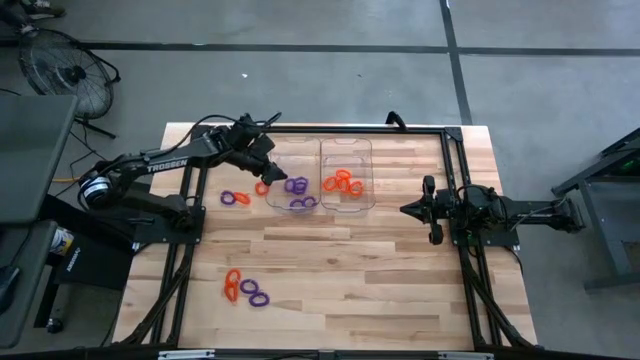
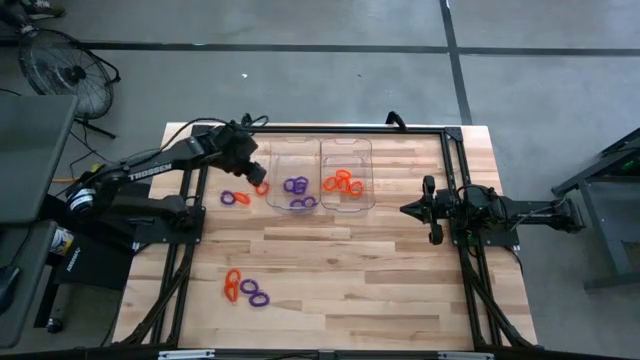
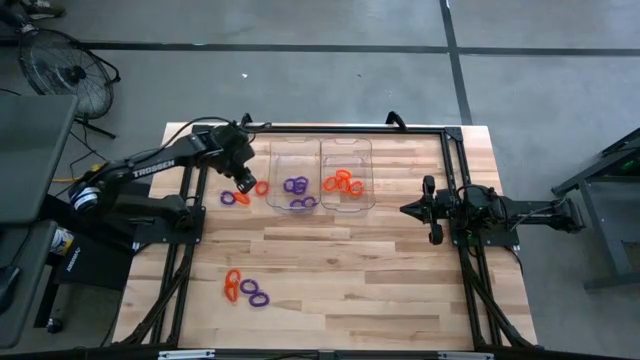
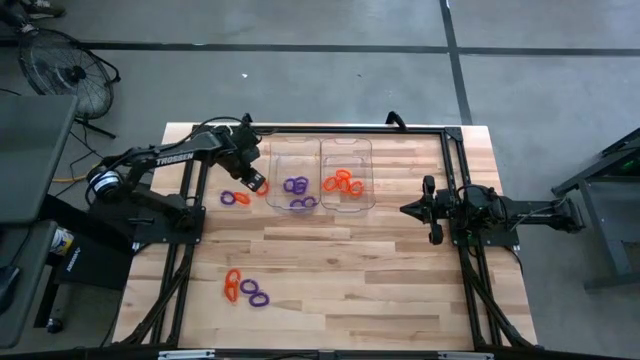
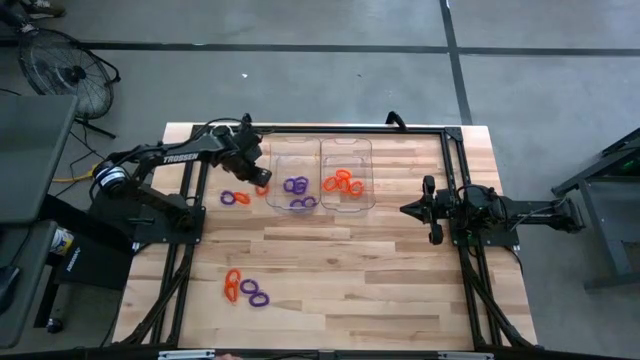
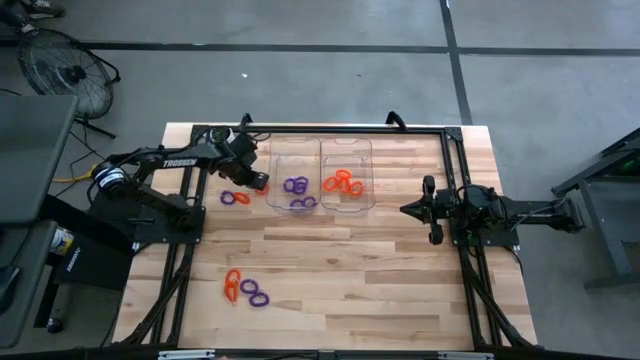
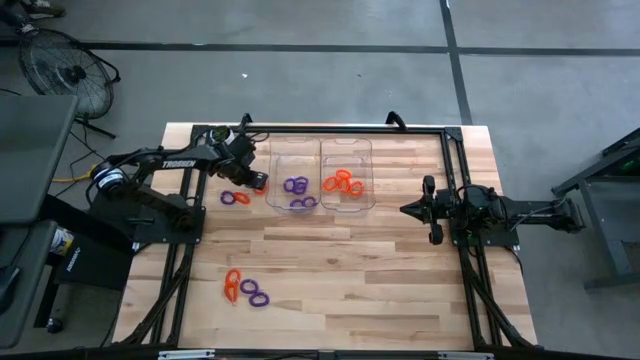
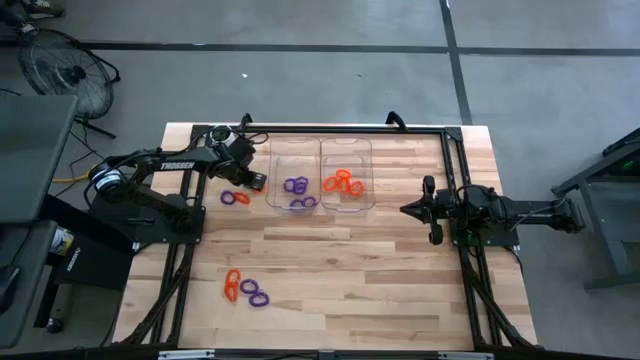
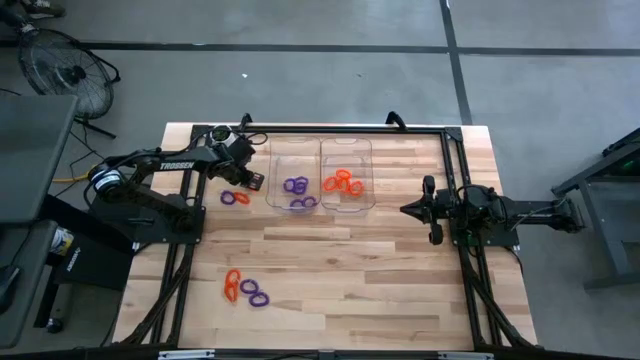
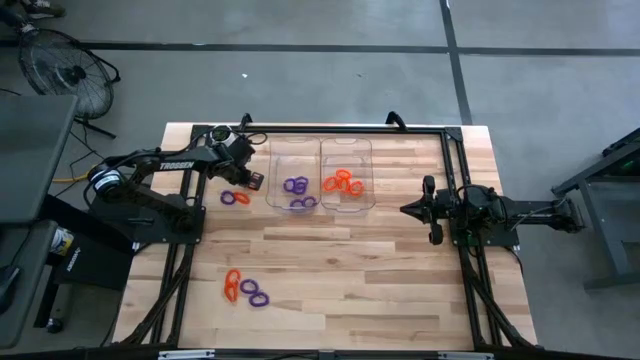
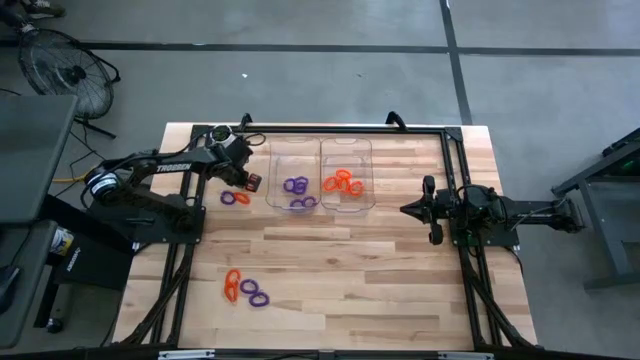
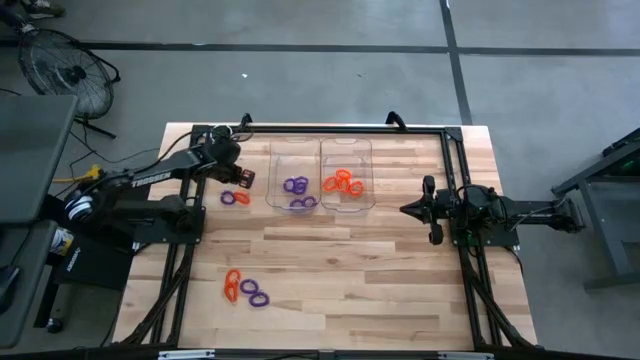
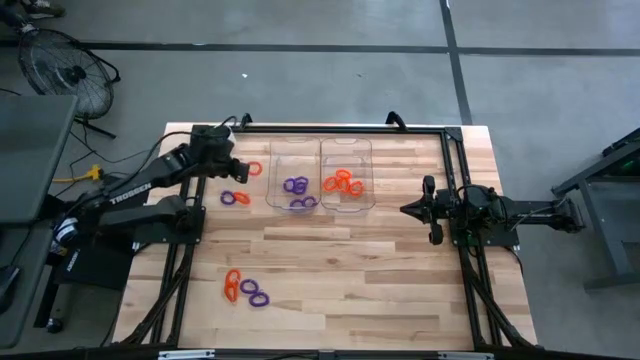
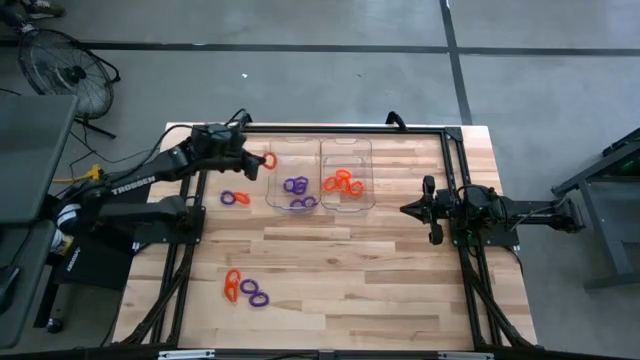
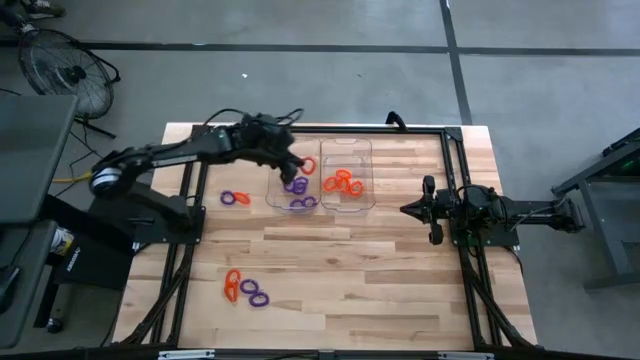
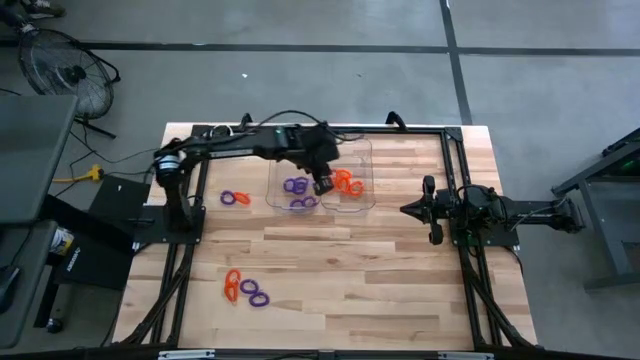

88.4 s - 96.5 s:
Task: Sort spring keychains
Put the orange spring keychain into the right transparent bin

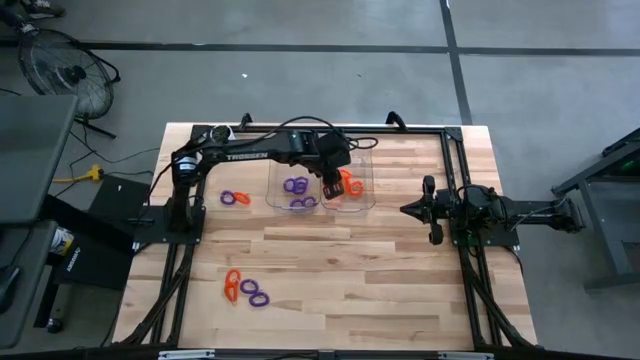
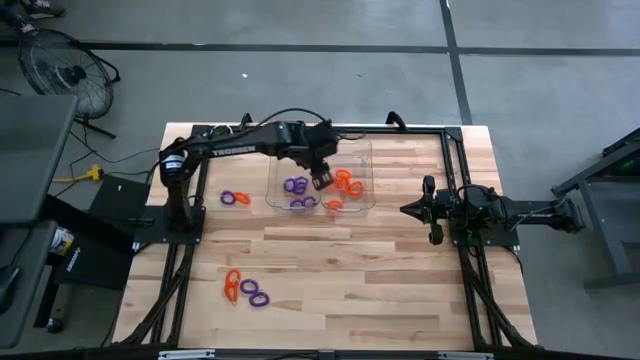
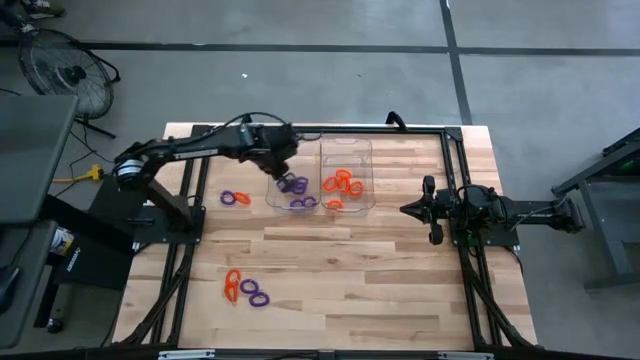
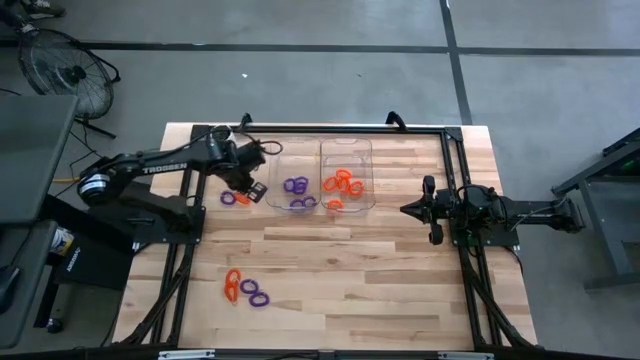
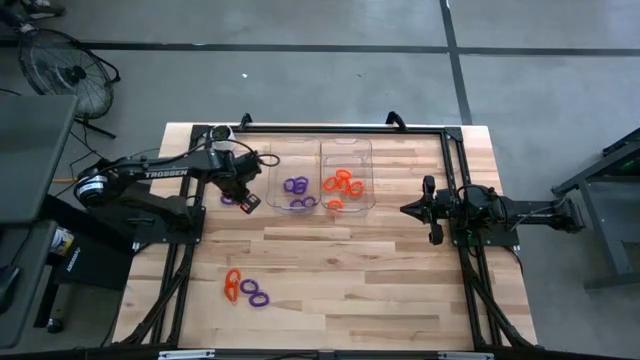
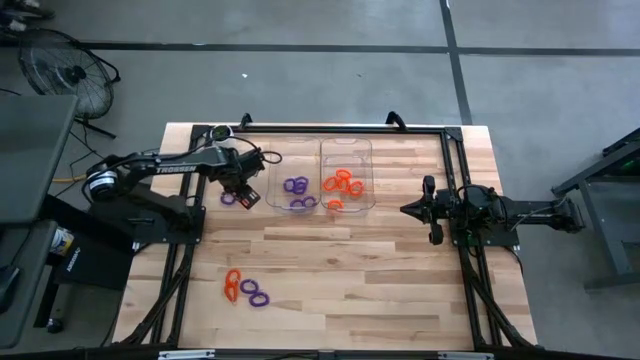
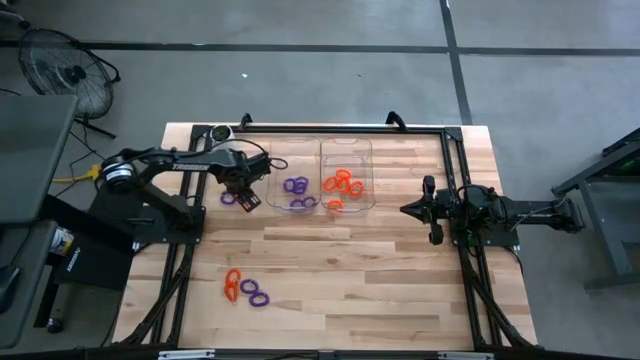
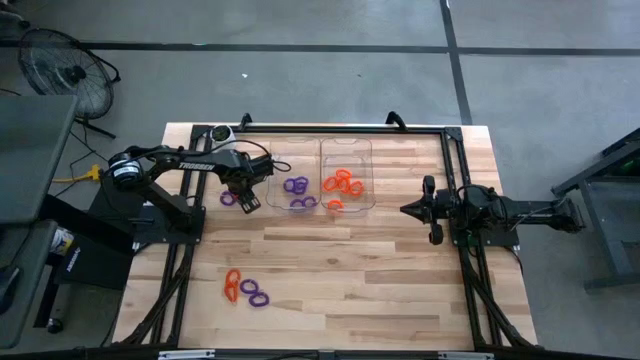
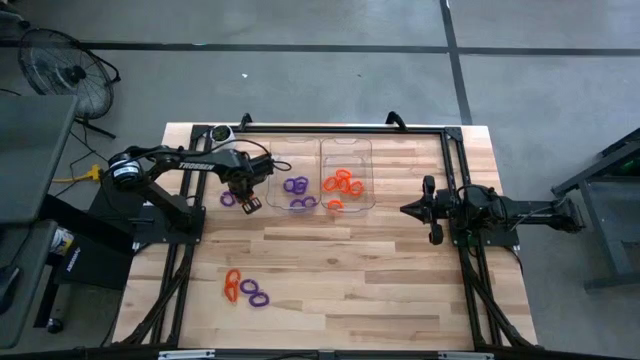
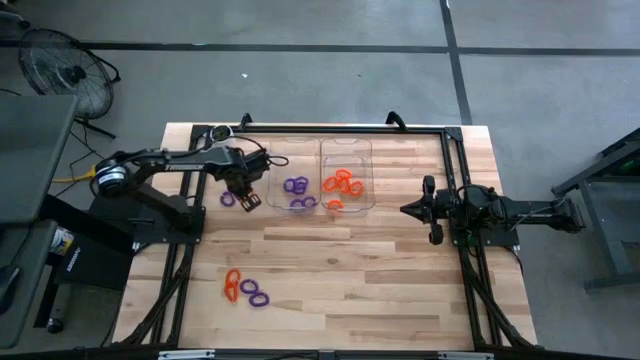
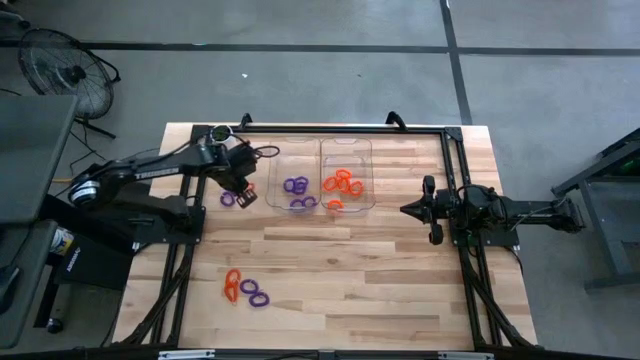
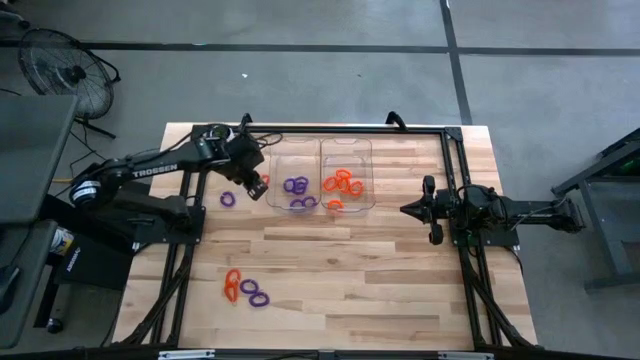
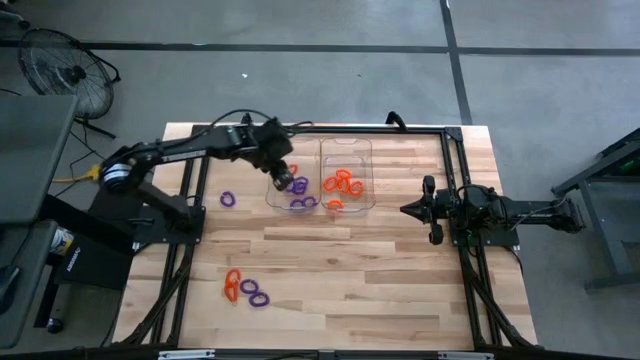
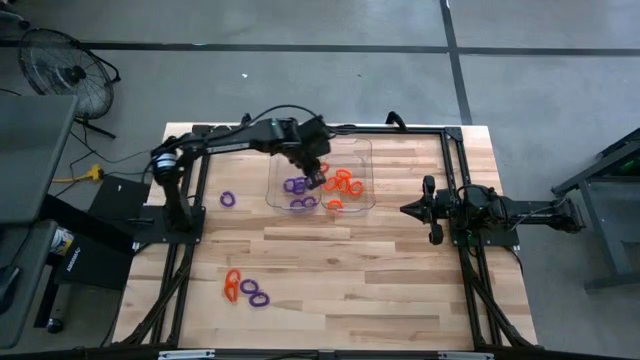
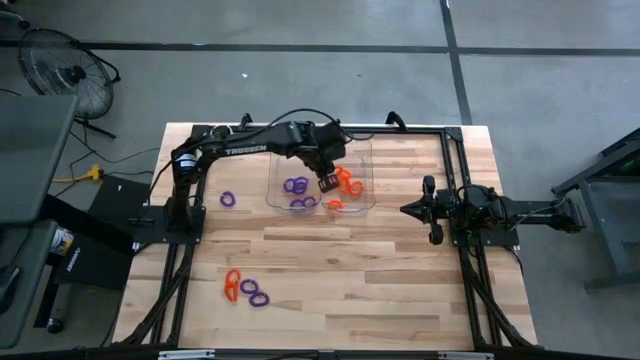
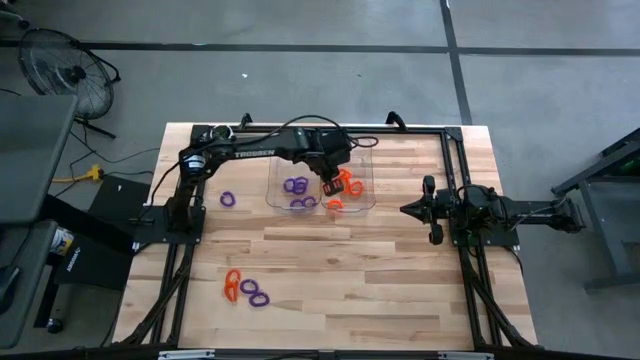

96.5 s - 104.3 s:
Put the orange spring keychain into the right transparent bin

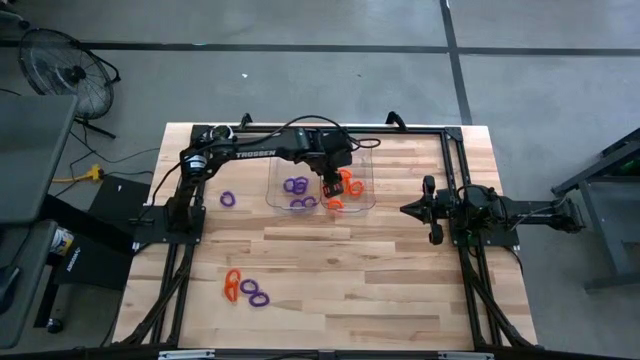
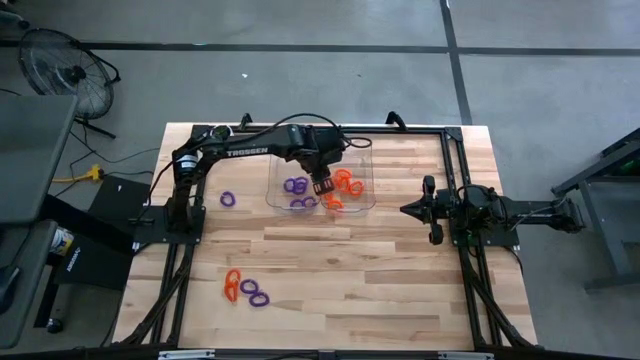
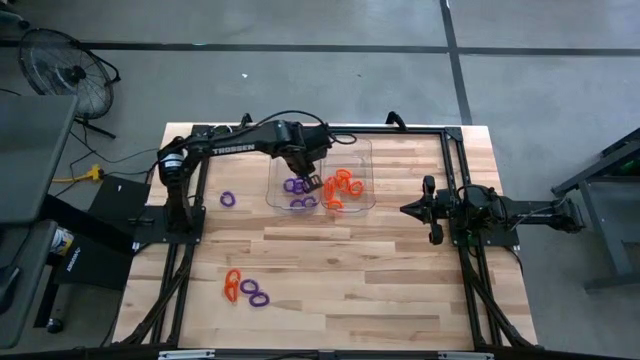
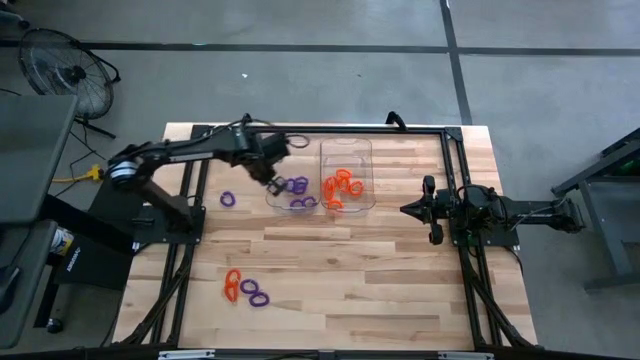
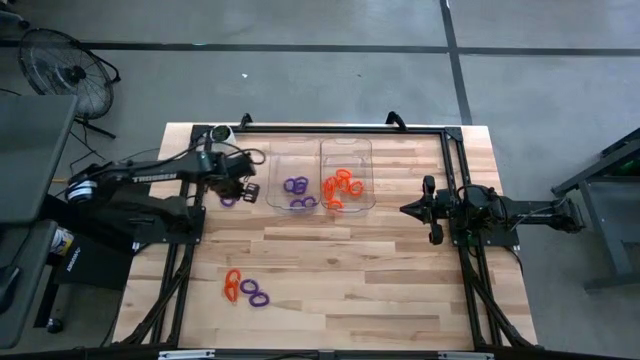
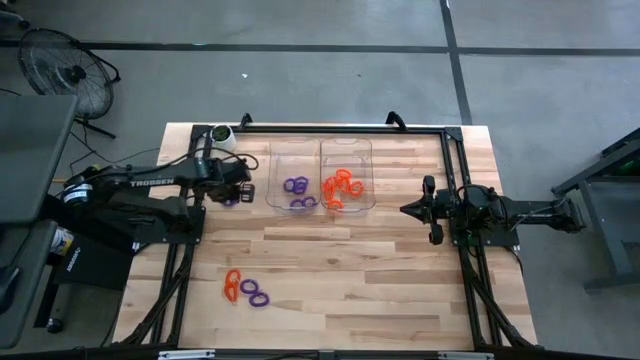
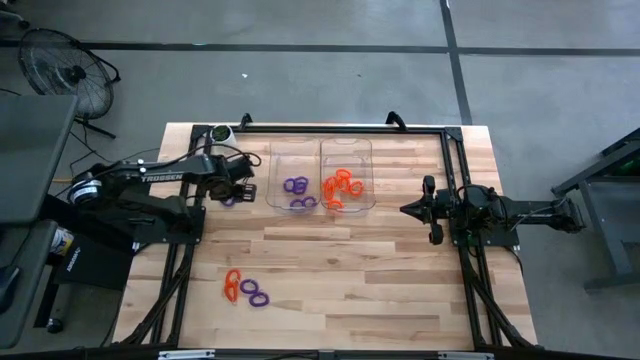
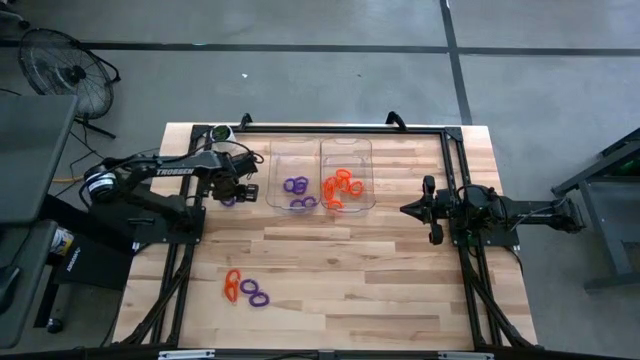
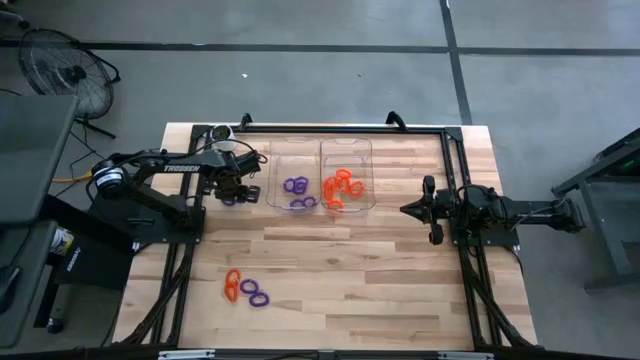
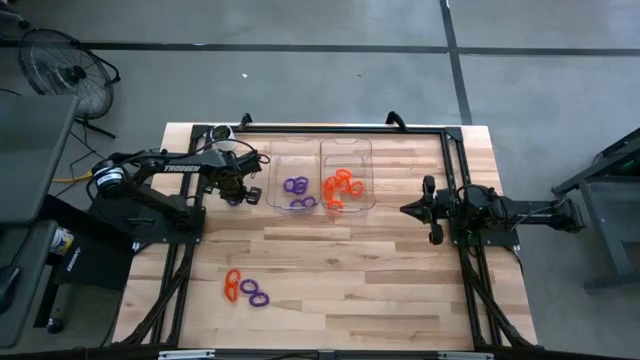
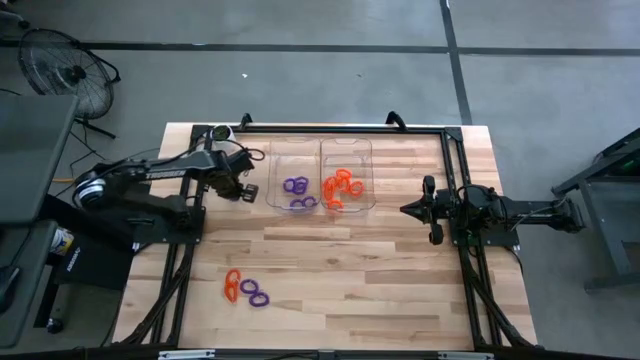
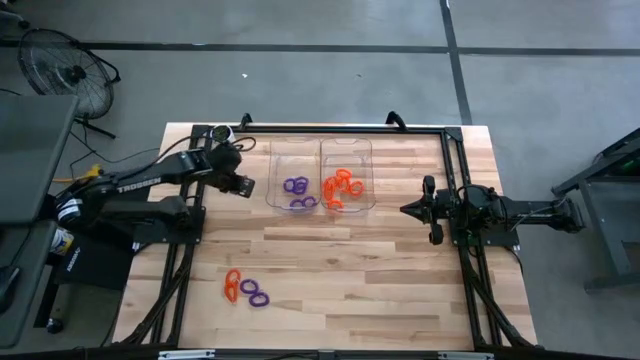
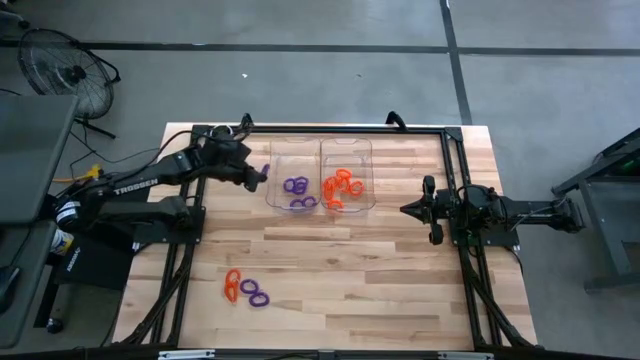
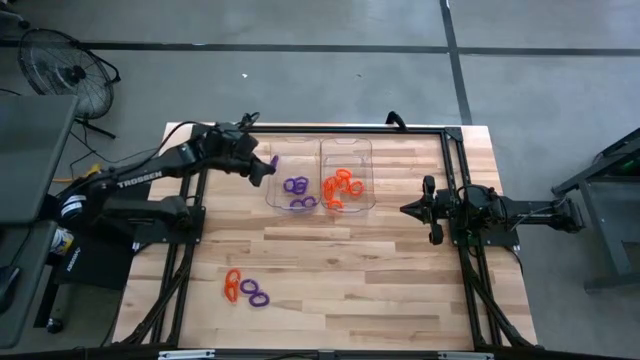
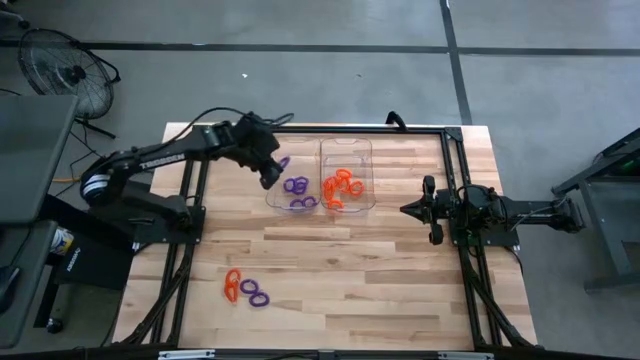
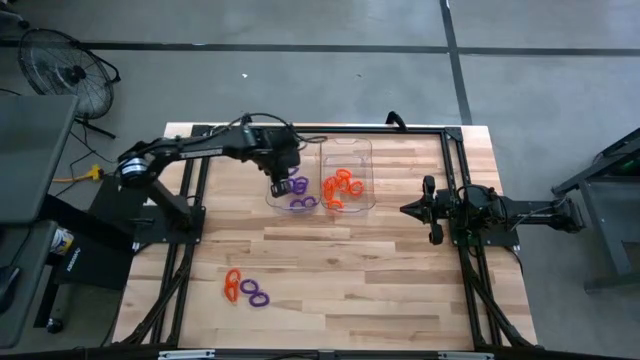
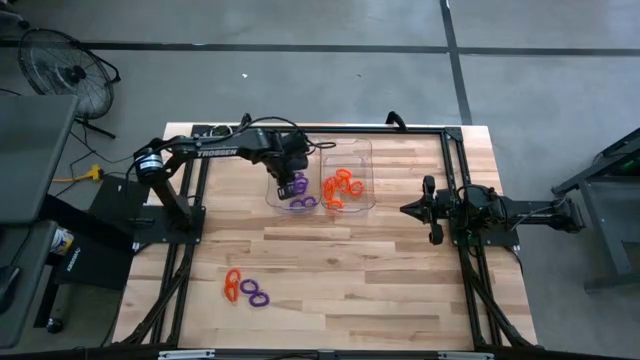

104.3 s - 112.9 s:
Put the purple spring keychain into the left transparent bin
